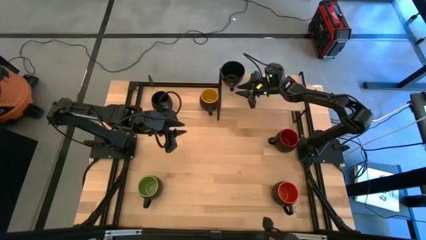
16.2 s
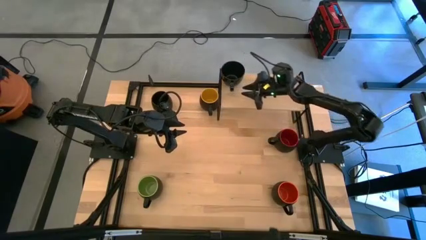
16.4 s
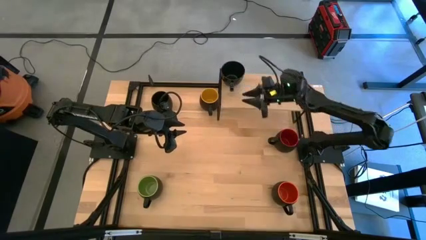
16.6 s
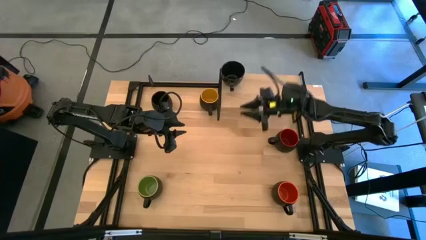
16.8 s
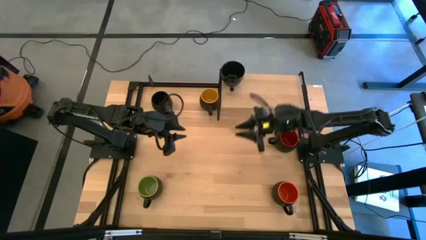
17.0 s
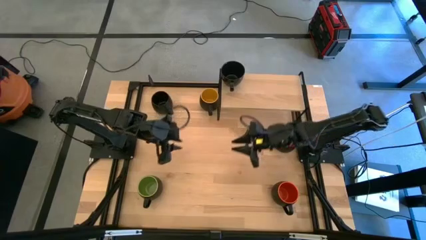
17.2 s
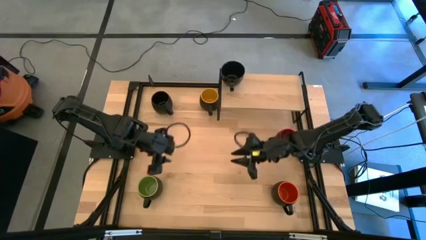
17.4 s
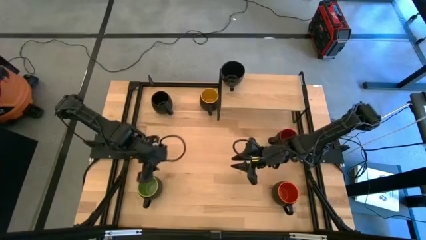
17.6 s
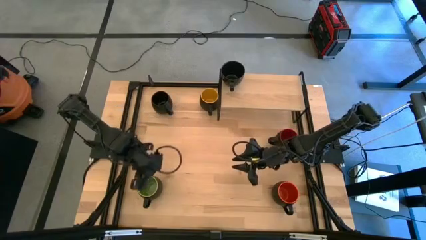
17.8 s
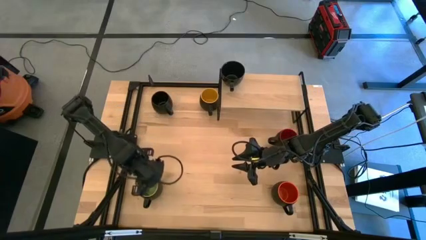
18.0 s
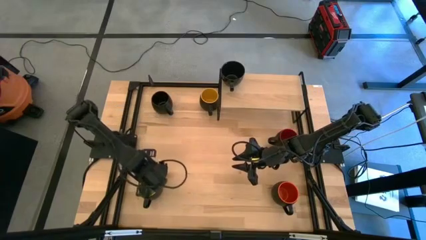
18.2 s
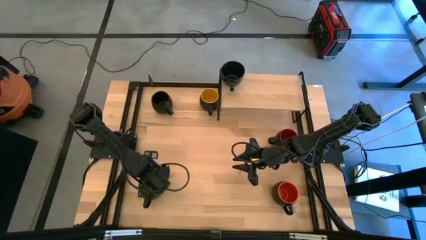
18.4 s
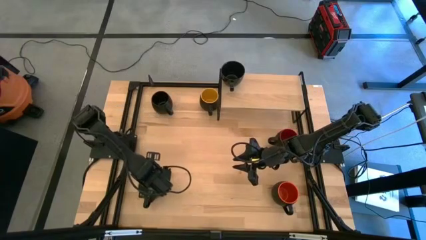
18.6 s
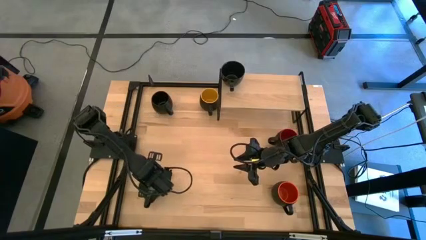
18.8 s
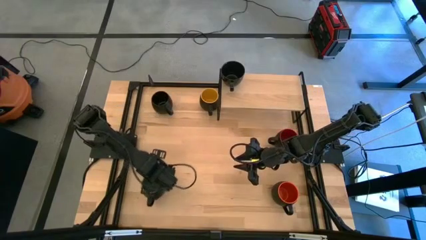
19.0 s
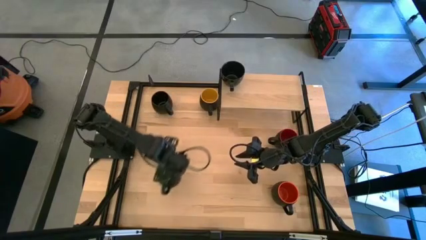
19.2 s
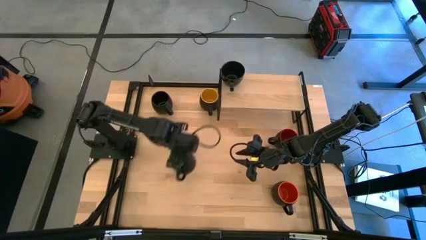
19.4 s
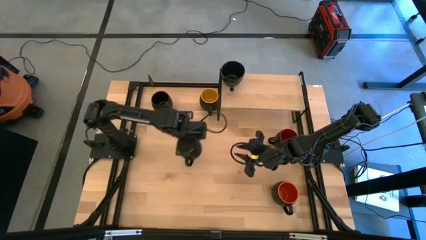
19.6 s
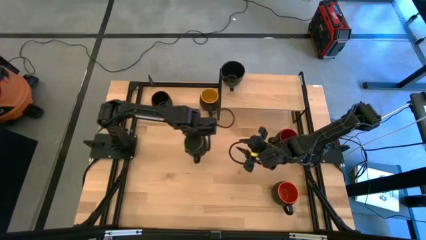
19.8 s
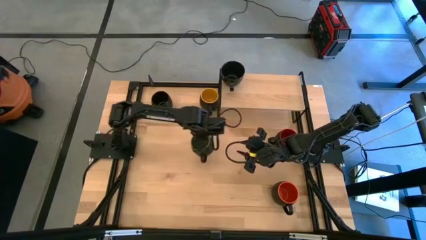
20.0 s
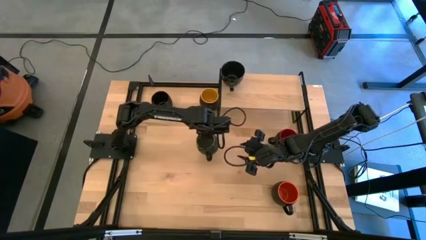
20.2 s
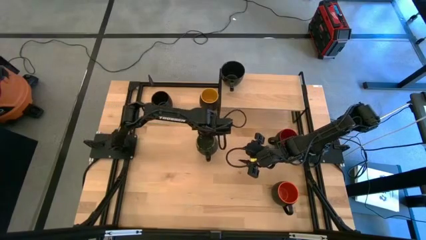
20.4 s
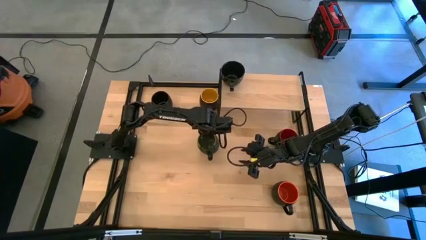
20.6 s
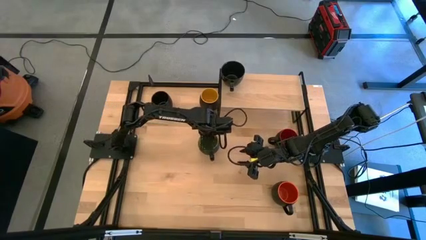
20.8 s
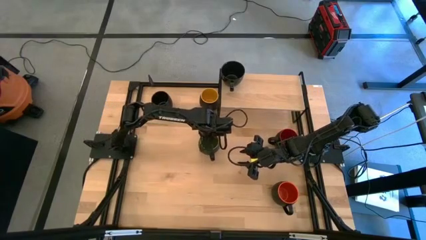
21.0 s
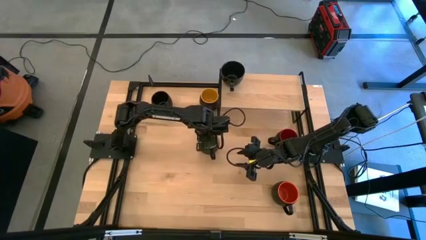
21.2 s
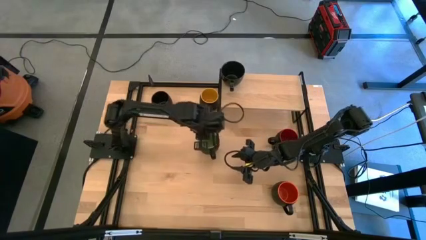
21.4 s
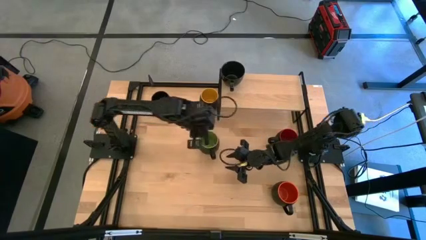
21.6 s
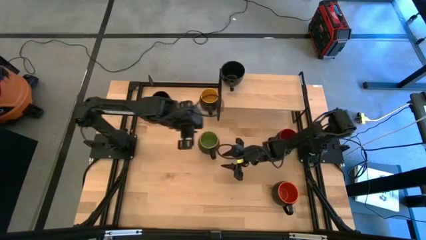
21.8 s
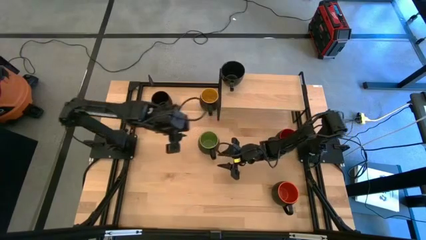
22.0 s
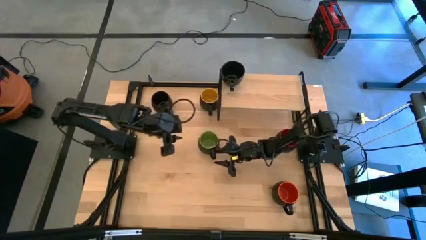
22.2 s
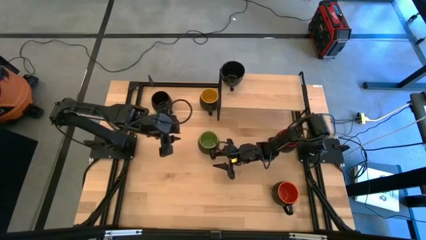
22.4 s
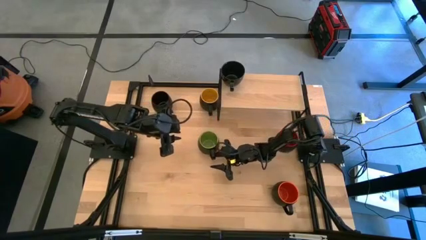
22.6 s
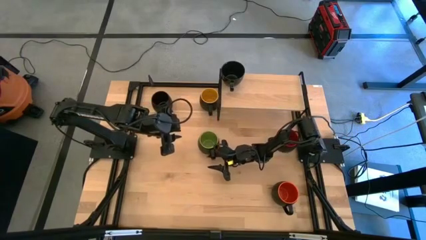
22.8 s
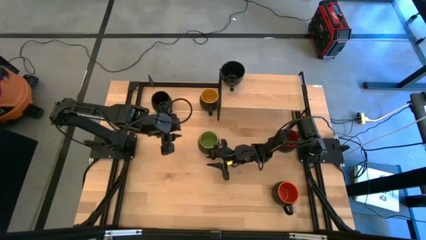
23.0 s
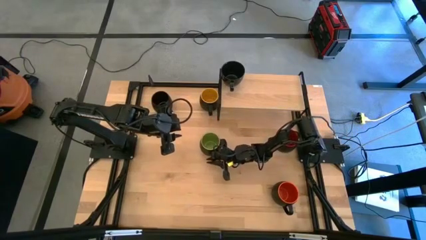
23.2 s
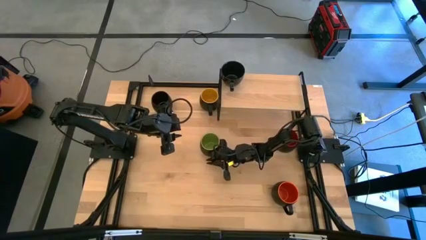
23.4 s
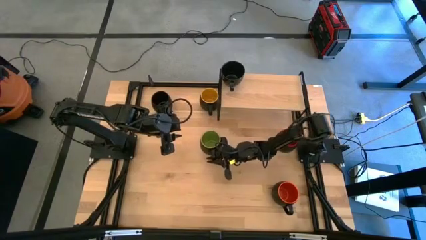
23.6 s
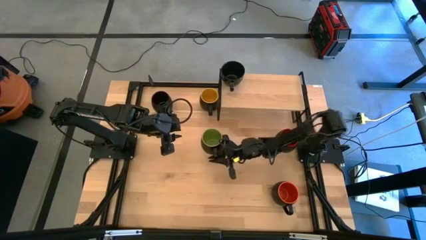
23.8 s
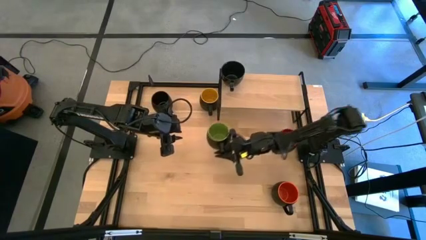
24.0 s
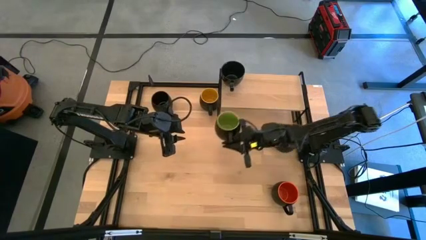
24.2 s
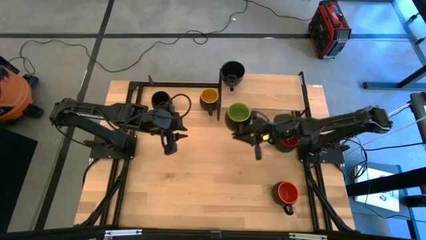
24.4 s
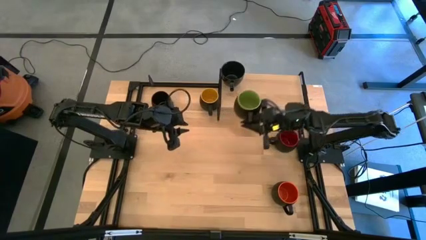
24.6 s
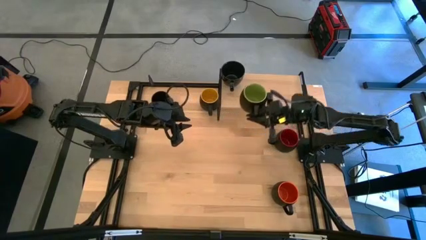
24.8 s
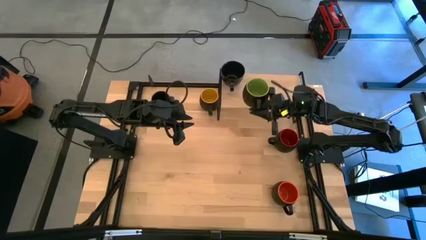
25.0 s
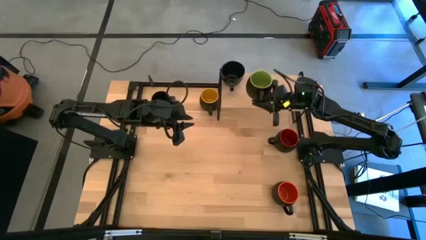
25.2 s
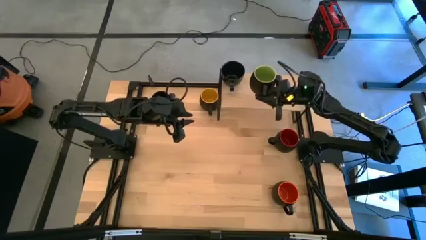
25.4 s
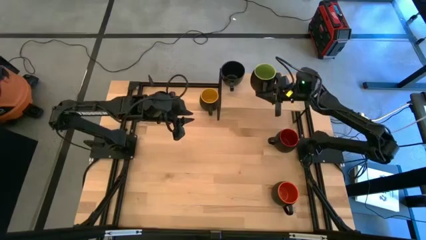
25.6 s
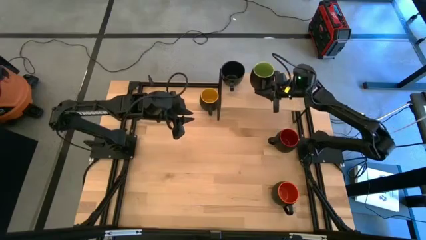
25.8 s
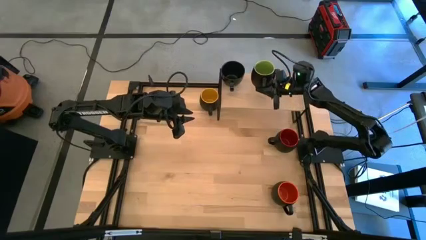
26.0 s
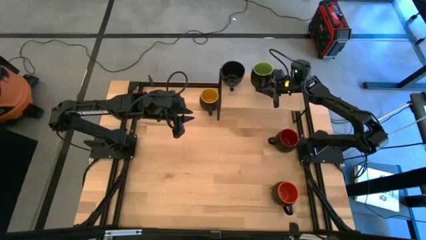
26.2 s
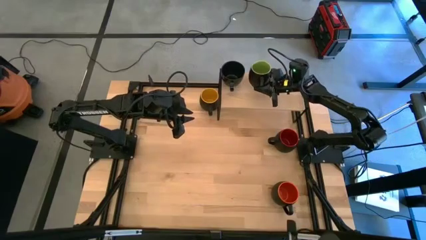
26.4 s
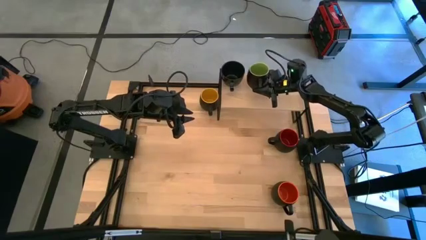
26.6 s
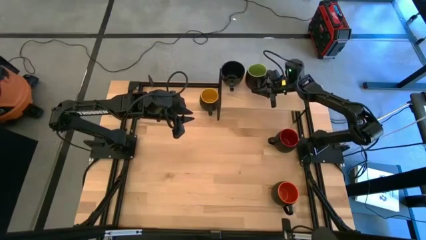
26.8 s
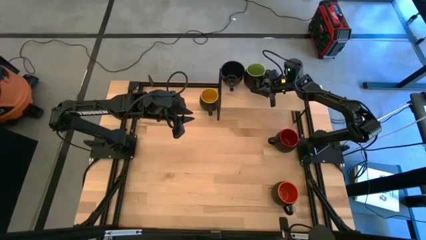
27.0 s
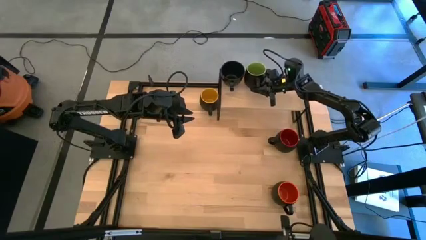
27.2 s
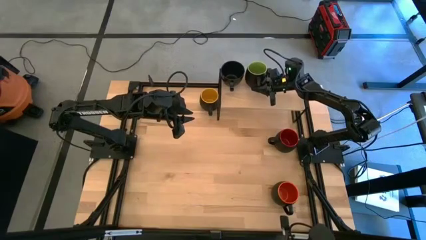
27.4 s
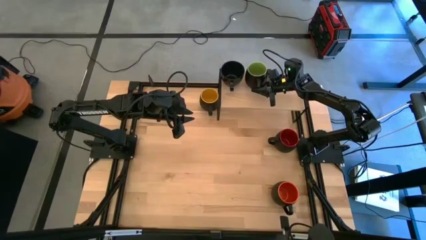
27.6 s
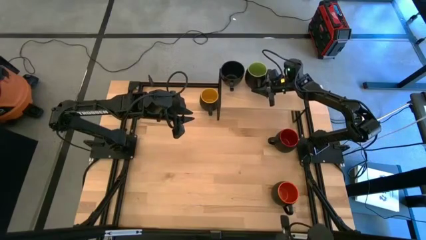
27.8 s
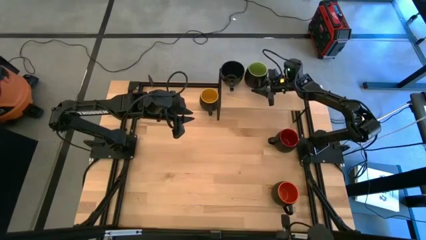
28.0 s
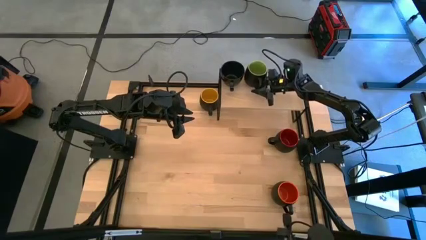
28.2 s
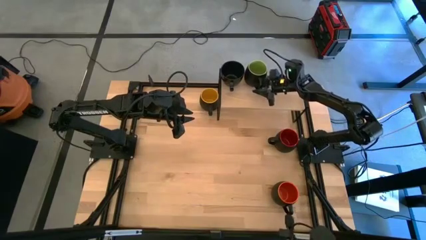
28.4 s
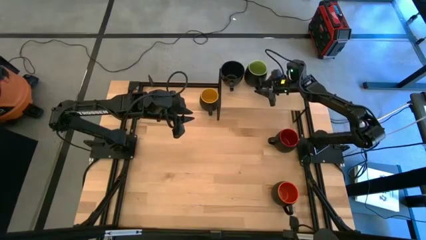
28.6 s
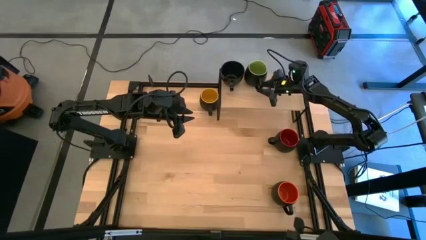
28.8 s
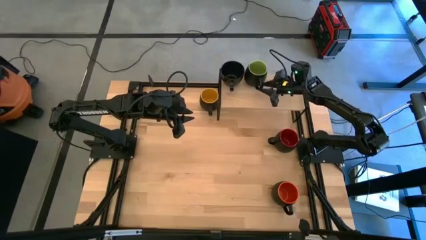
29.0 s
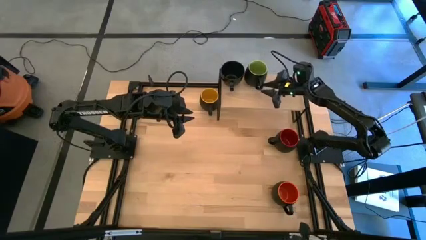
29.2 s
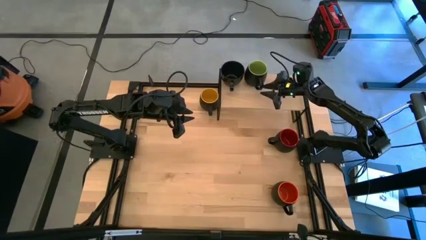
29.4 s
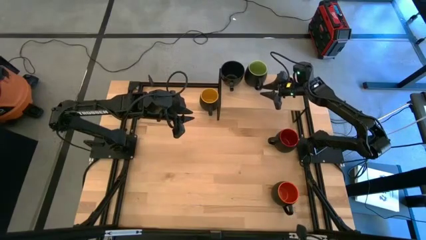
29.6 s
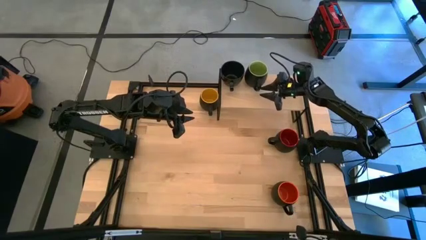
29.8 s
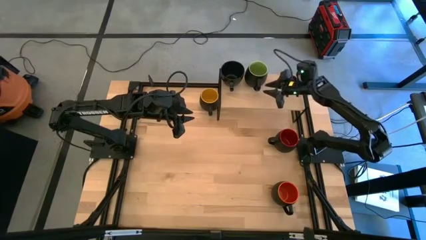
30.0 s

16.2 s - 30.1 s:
Task: Place coffee mugs
Put the black green mug on the shelf
